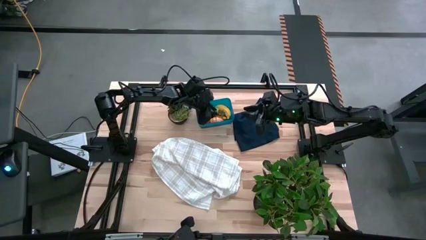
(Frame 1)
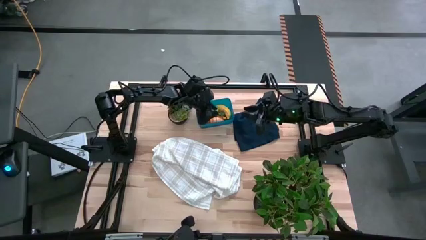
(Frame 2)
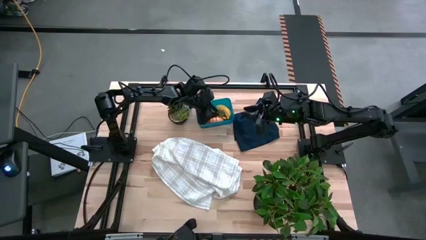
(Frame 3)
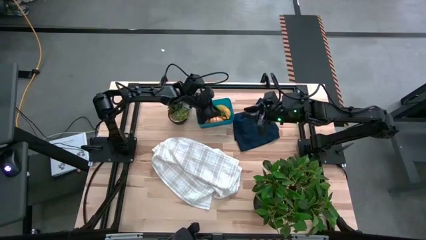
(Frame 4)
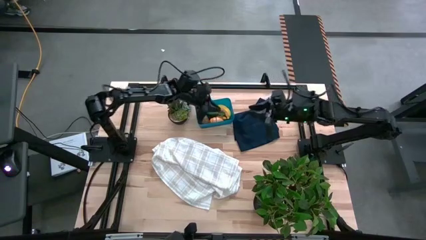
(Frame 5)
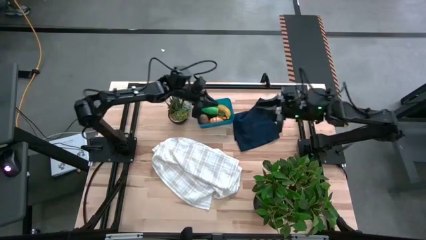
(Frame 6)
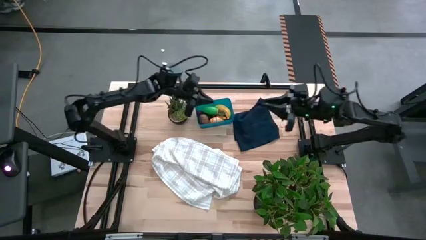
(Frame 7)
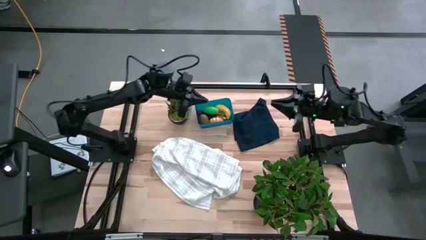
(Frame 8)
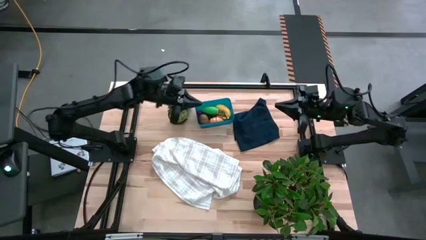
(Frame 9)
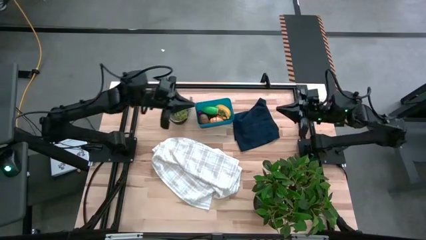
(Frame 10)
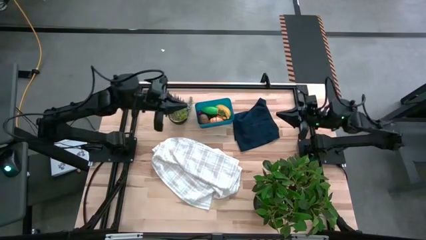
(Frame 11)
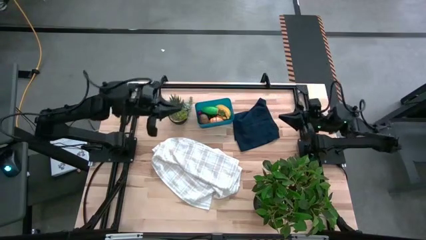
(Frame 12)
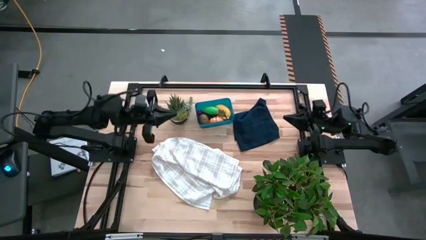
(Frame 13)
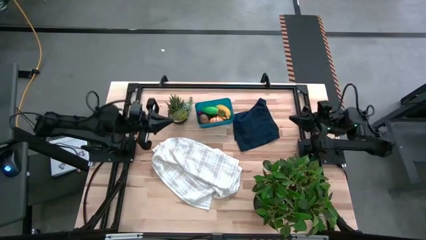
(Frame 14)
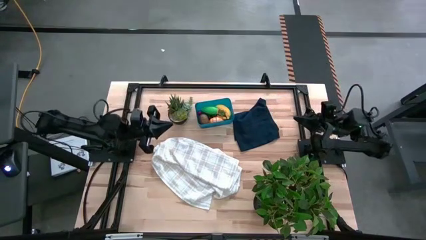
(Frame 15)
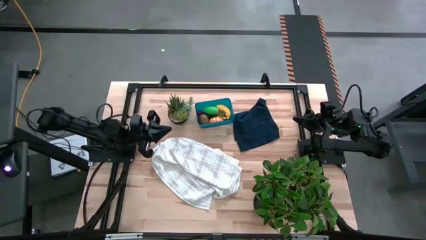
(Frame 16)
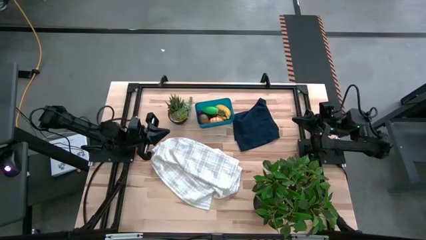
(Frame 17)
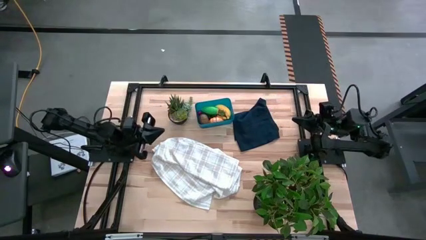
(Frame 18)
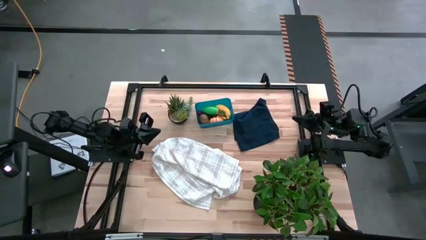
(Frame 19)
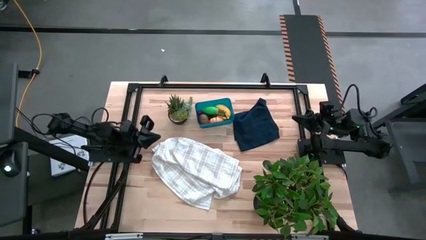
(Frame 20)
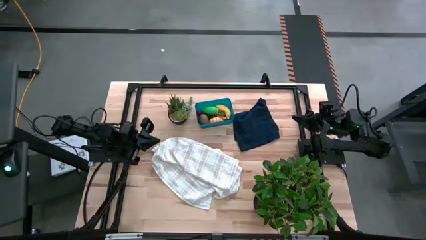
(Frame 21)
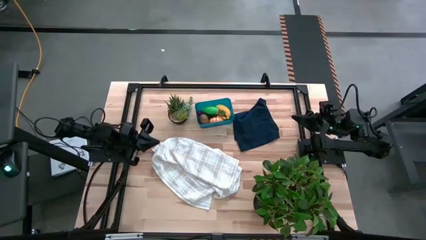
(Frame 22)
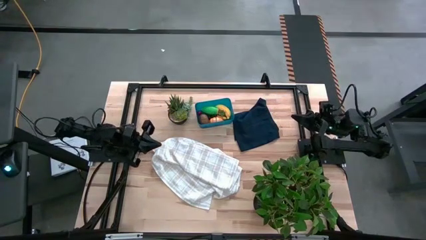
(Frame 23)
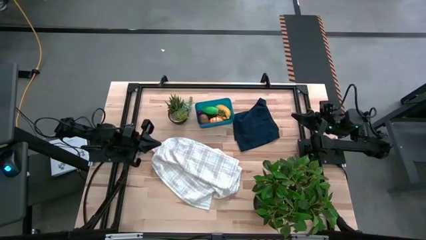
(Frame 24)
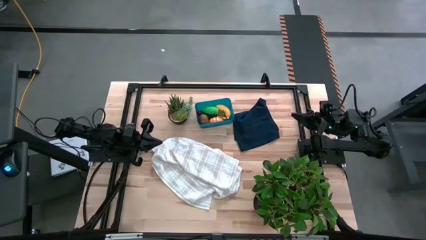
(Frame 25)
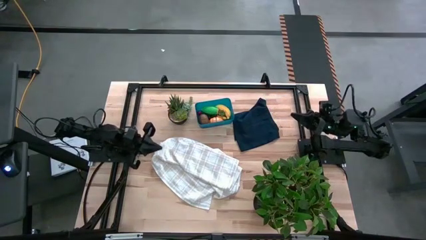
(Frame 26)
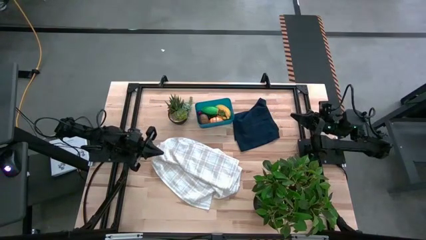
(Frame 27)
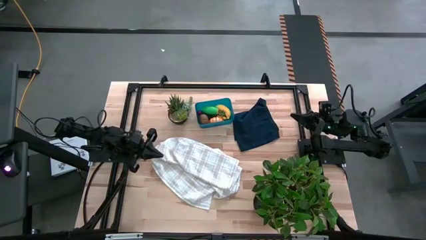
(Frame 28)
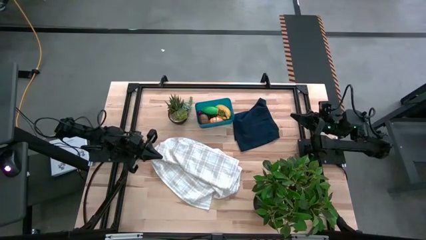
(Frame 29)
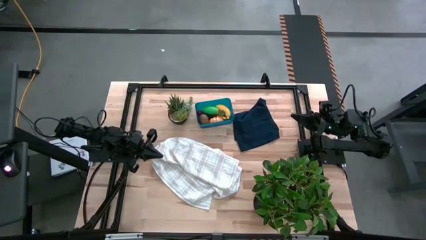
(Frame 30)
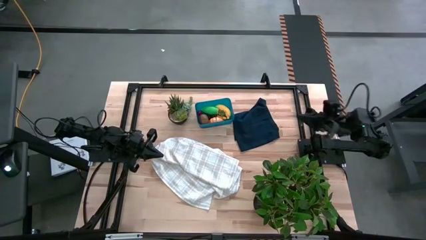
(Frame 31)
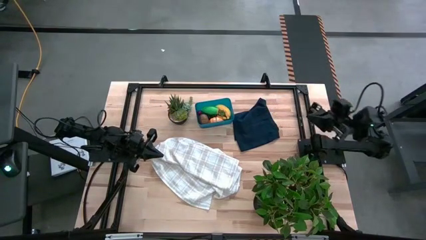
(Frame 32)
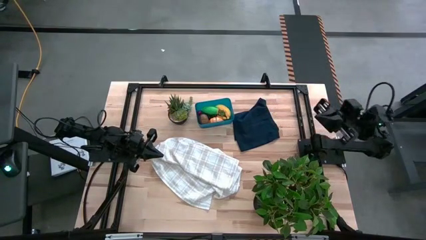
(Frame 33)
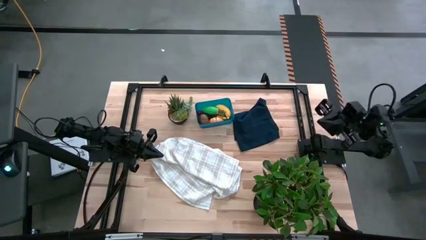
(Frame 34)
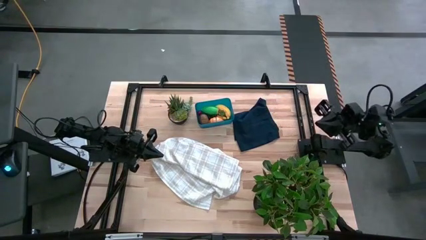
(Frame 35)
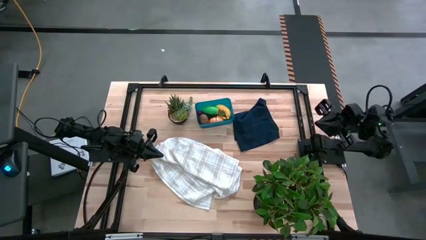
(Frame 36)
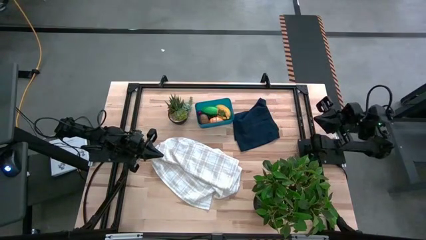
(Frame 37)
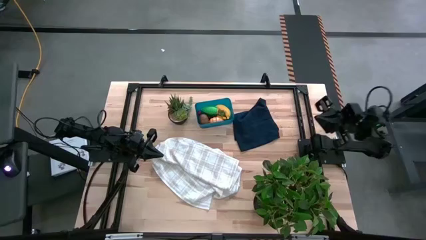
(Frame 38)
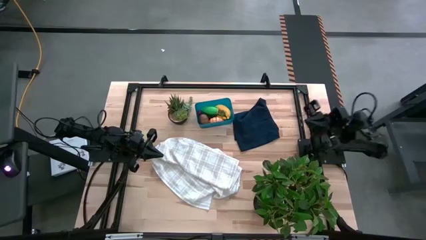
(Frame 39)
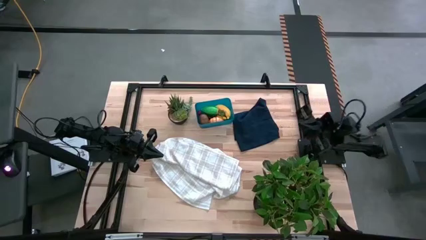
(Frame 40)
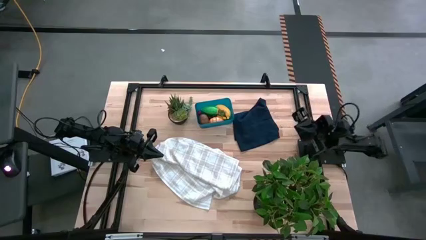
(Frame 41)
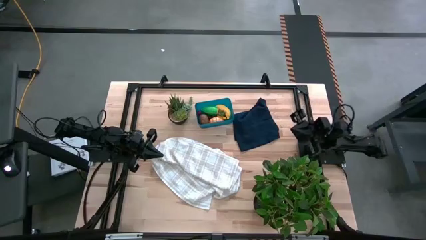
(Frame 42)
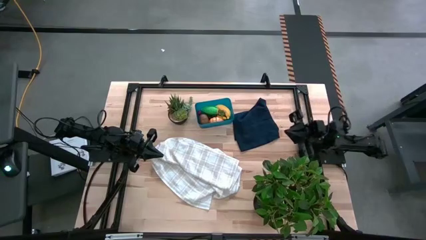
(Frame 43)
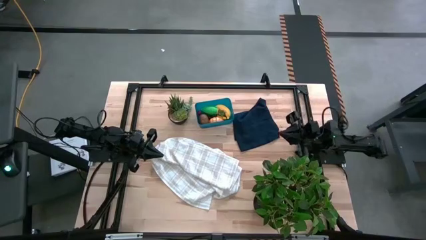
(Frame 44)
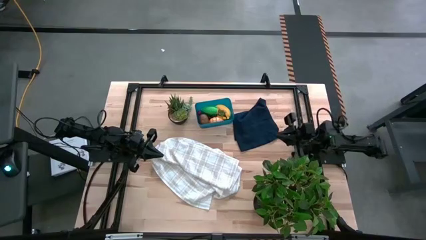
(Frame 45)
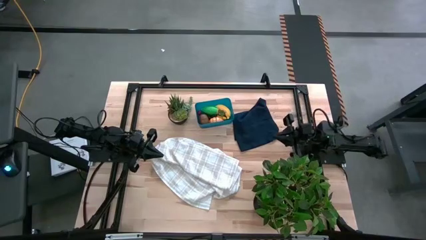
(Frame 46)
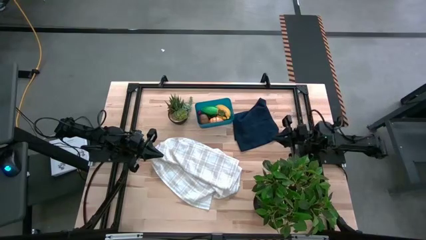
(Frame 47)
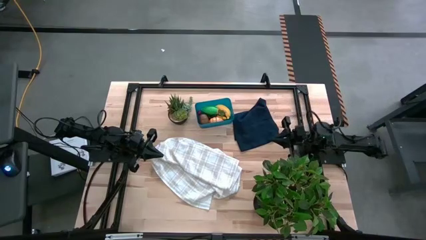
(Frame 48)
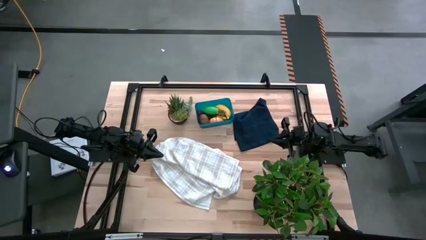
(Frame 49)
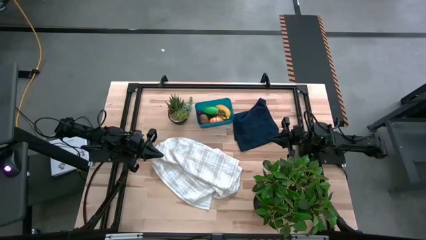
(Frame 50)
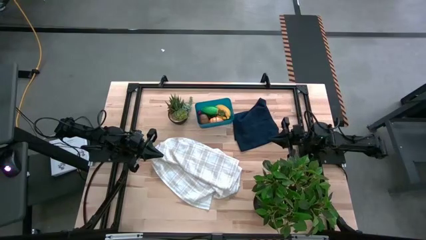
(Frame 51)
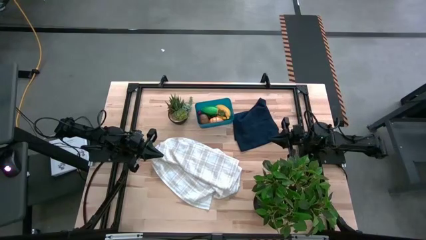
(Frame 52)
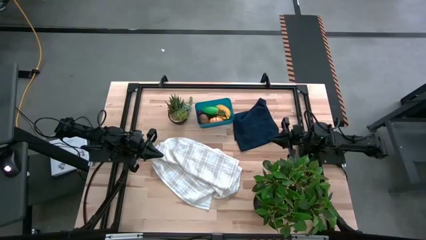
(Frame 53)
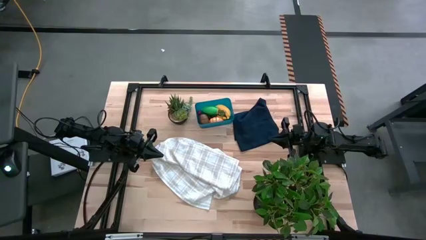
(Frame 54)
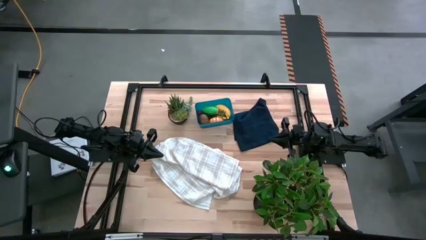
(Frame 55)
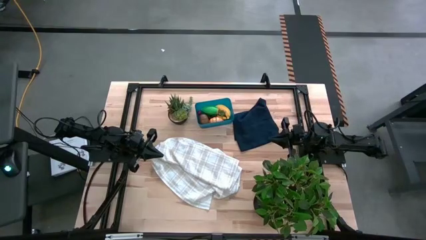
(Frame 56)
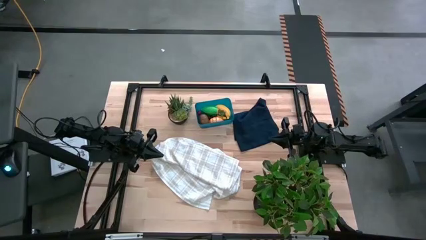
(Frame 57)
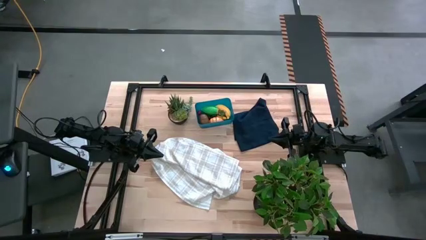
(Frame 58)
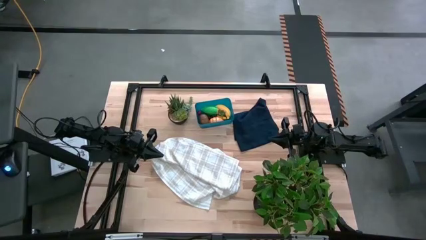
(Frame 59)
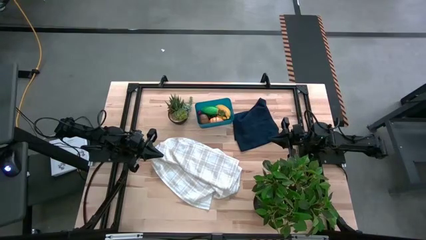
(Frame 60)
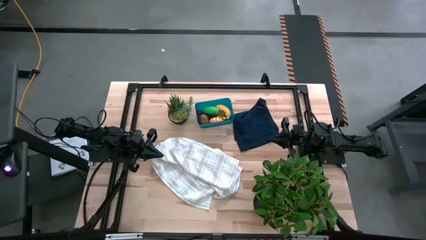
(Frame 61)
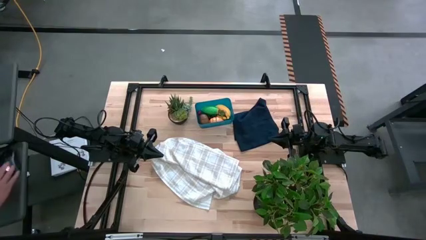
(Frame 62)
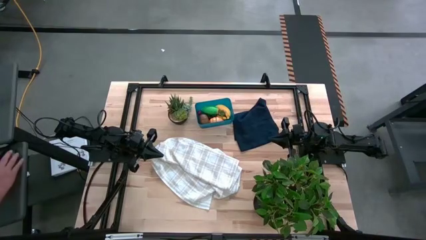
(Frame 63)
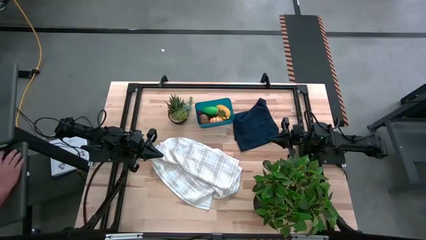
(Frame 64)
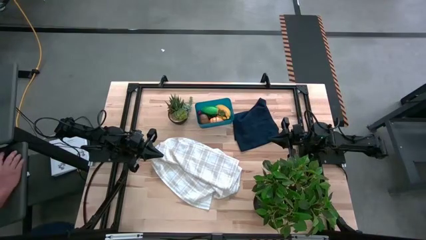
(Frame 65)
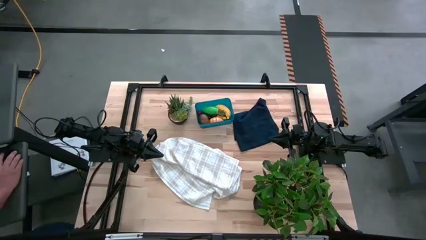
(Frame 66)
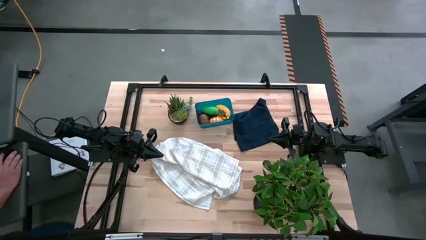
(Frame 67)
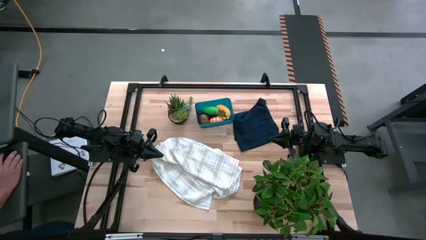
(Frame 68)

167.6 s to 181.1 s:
Task: Pick and placing Produce into tupperware
Return to Home Position

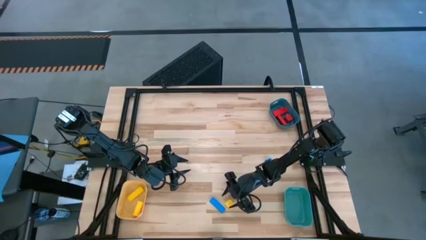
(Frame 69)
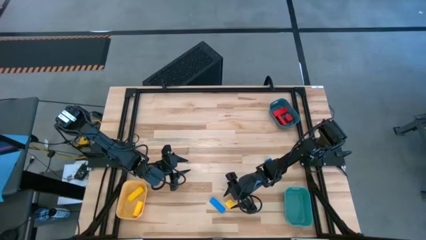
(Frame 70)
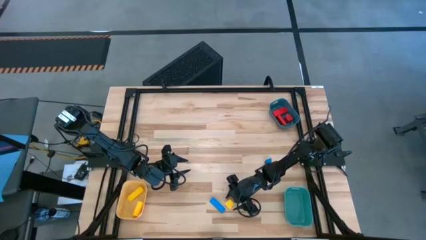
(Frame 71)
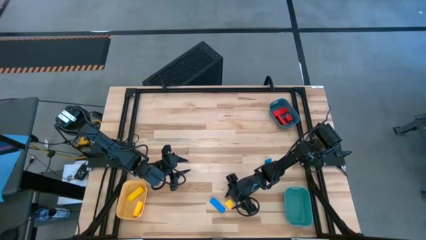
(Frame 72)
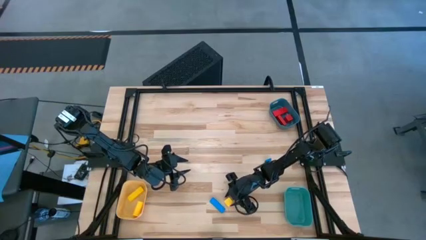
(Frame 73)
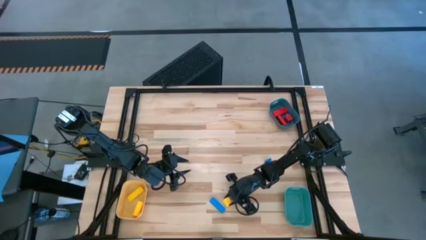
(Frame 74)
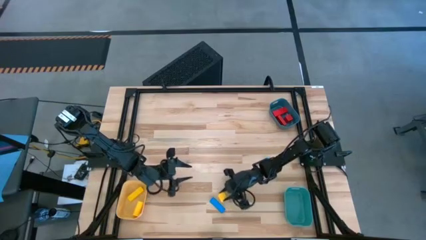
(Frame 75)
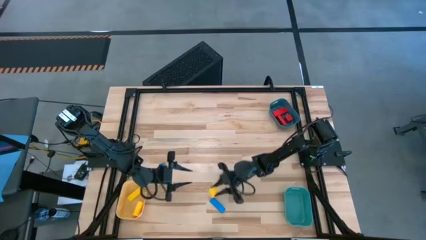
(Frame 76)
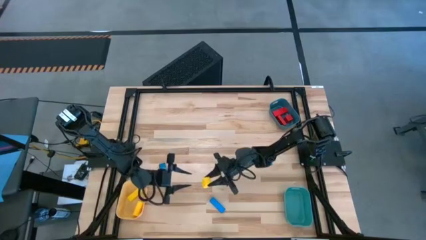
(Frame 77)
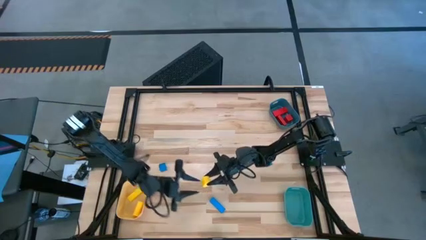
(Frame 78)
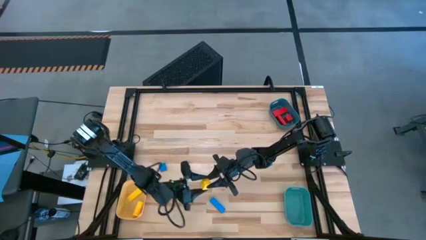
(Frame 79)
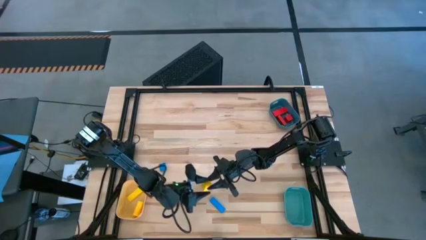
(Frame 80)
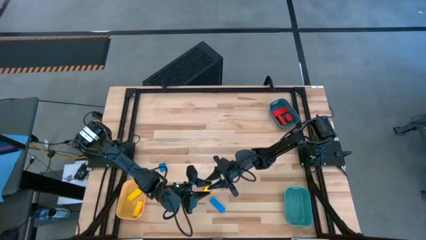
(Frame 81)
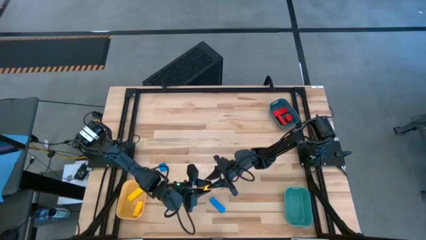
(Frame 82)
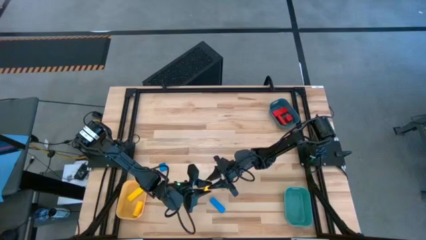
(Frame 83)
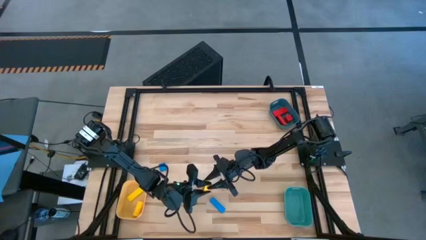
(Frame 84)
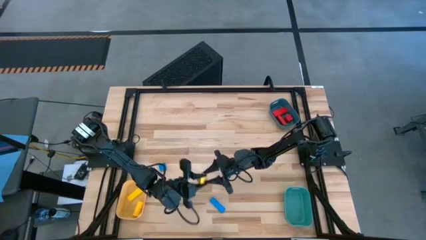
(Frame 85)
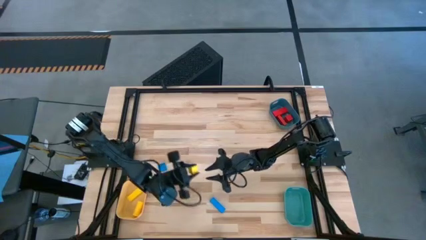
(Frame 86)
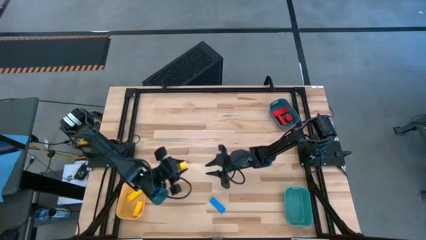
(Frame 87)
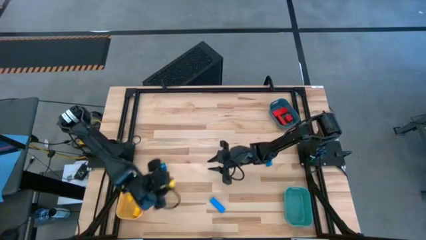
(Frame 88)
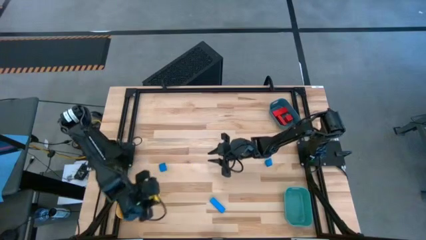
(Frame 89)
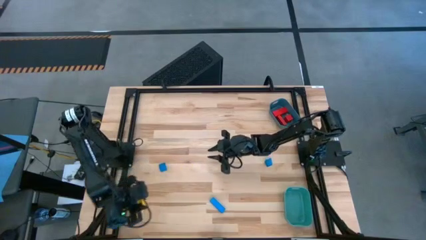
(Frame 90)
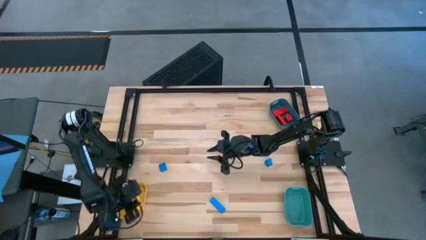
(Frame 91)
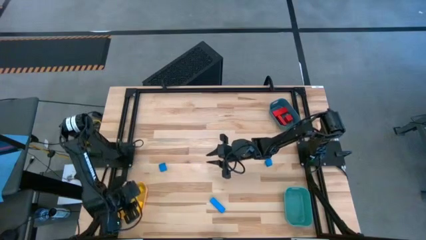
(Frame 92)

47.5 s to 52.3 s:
Task: Sort & place blocks by color
Put the yellow block into the yellow bin
